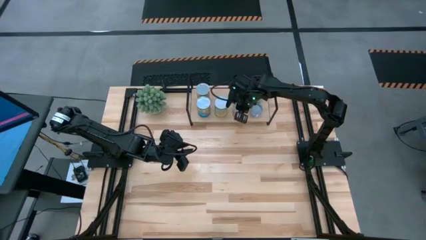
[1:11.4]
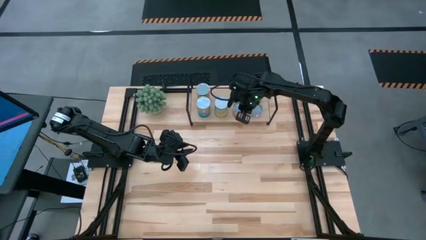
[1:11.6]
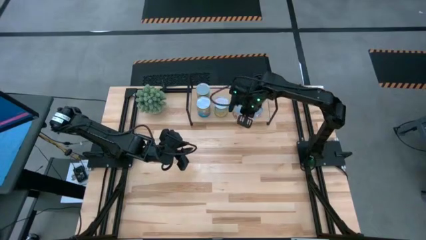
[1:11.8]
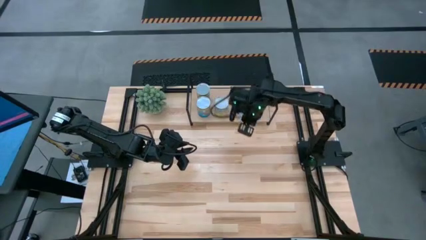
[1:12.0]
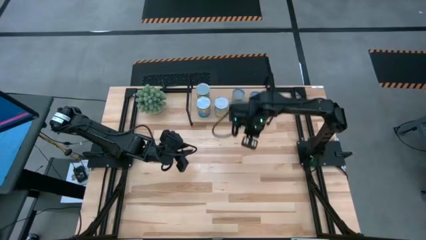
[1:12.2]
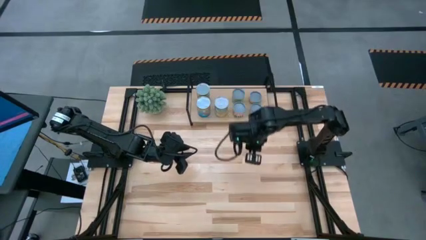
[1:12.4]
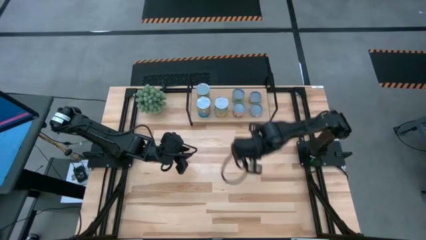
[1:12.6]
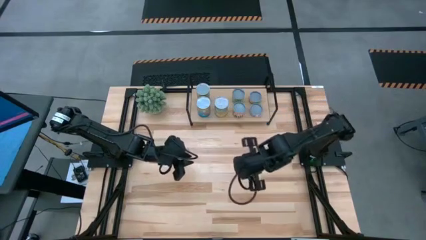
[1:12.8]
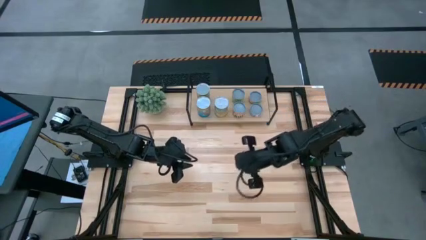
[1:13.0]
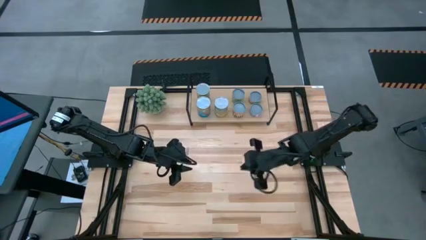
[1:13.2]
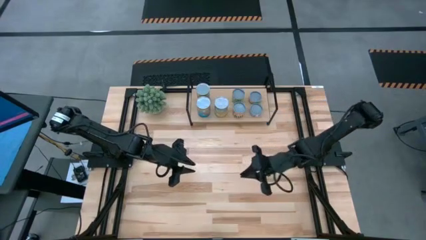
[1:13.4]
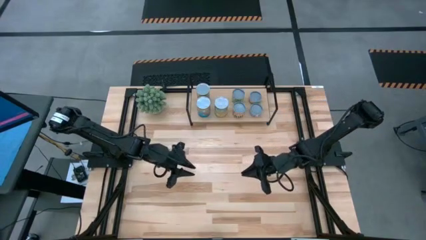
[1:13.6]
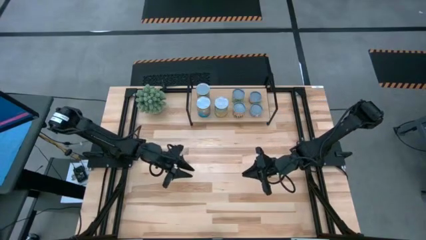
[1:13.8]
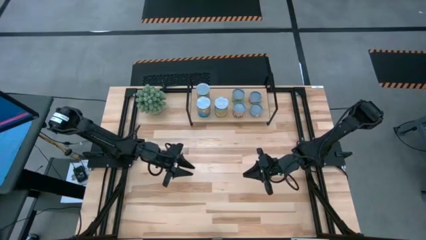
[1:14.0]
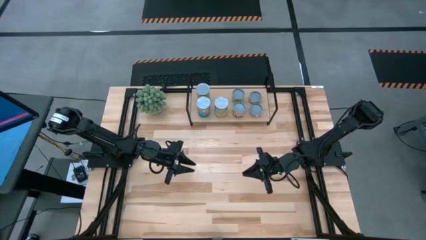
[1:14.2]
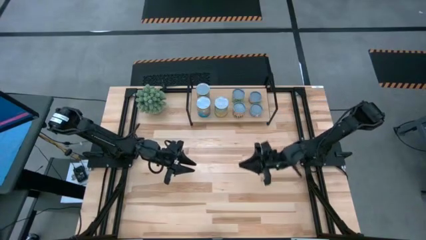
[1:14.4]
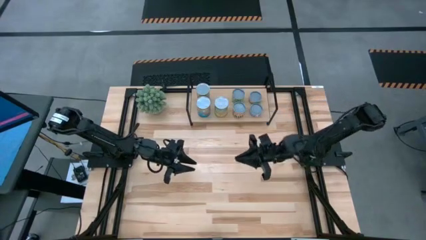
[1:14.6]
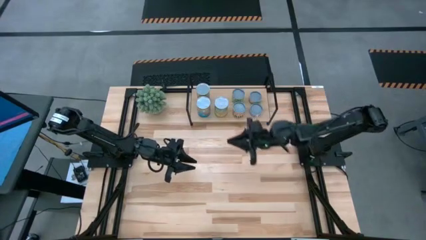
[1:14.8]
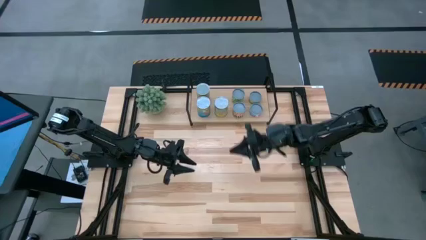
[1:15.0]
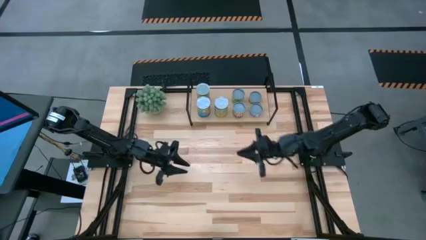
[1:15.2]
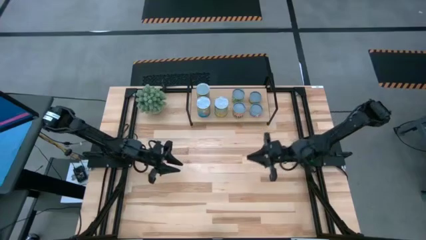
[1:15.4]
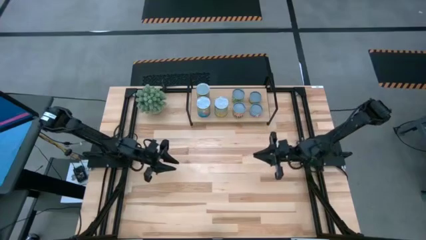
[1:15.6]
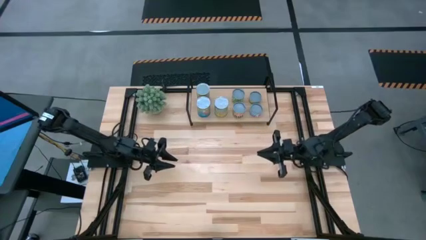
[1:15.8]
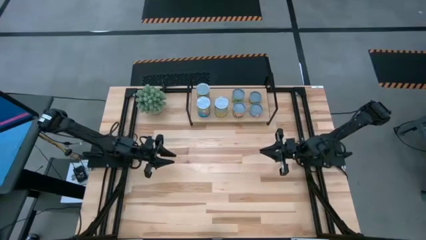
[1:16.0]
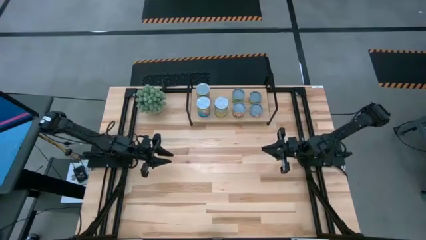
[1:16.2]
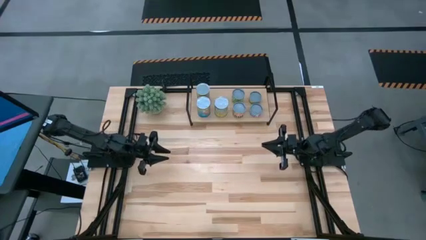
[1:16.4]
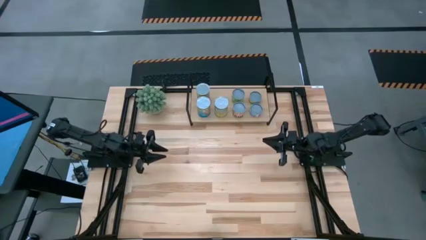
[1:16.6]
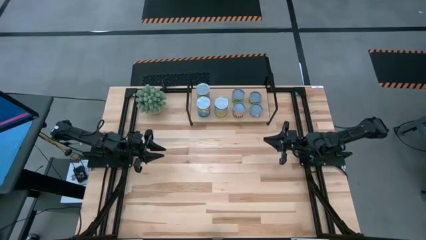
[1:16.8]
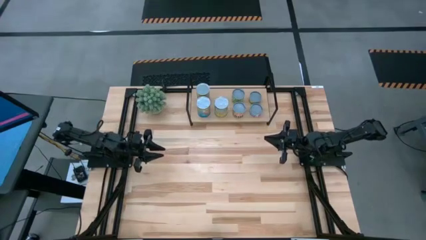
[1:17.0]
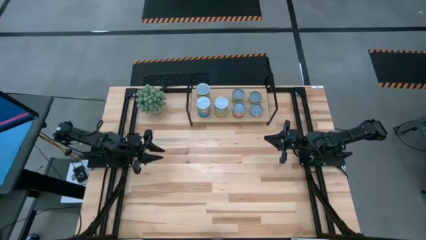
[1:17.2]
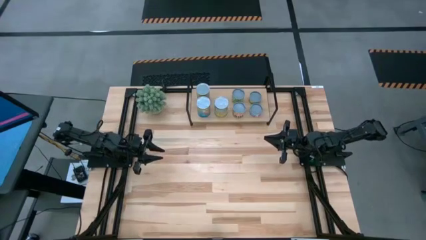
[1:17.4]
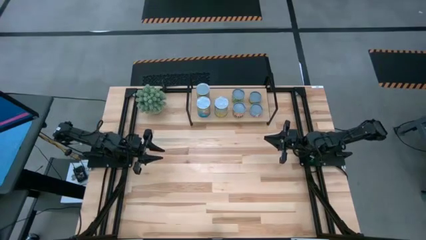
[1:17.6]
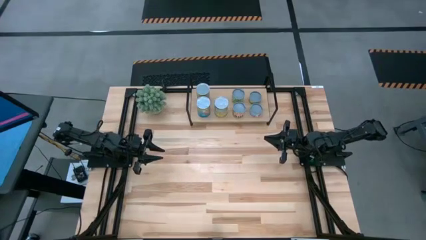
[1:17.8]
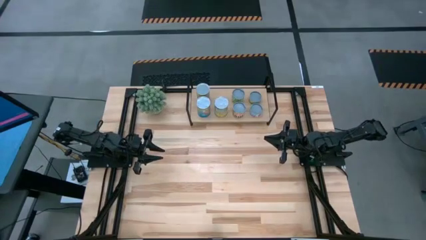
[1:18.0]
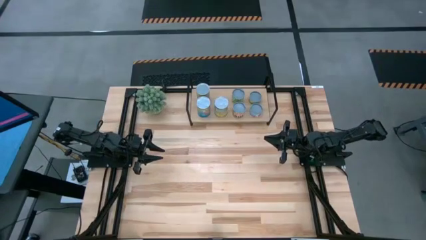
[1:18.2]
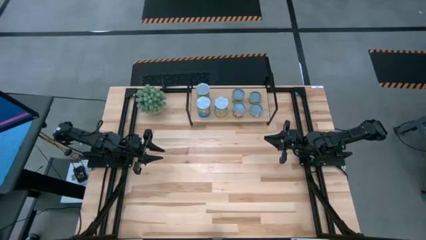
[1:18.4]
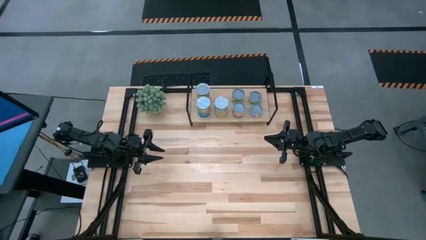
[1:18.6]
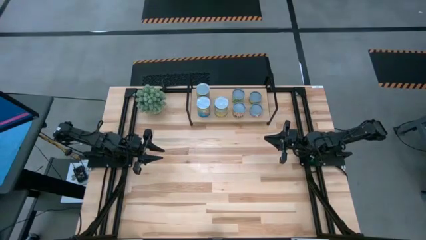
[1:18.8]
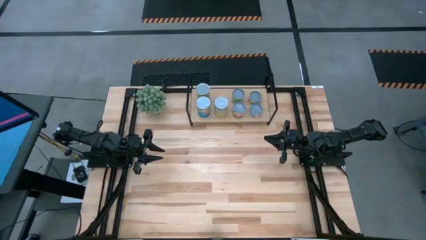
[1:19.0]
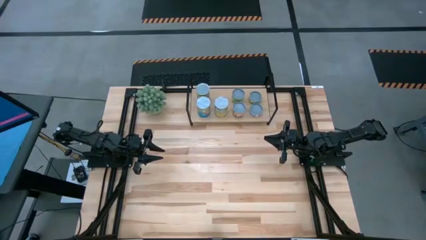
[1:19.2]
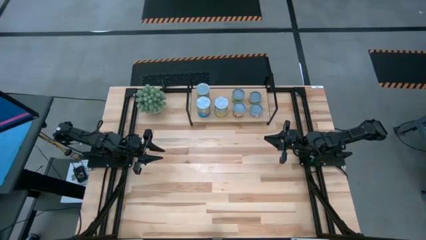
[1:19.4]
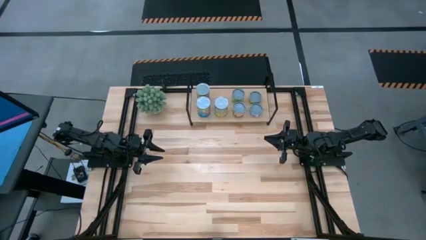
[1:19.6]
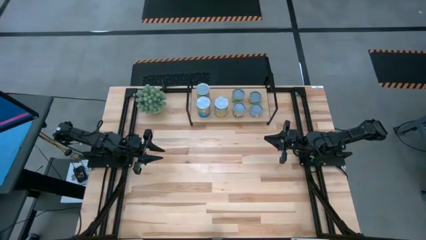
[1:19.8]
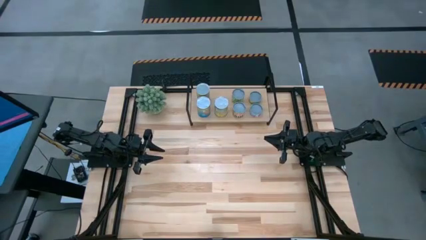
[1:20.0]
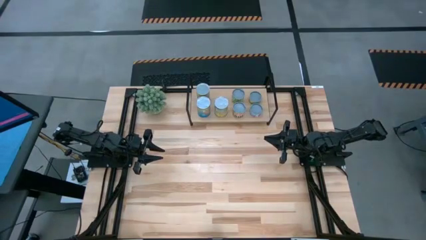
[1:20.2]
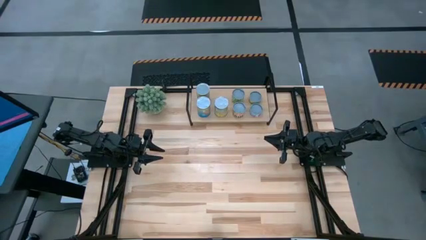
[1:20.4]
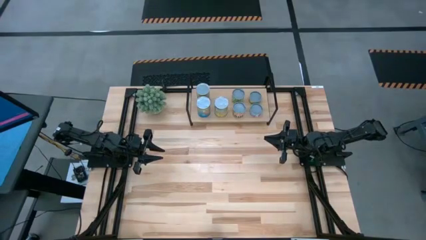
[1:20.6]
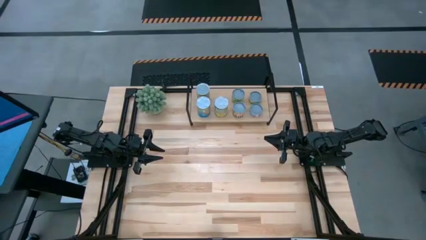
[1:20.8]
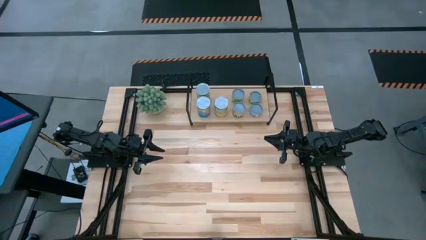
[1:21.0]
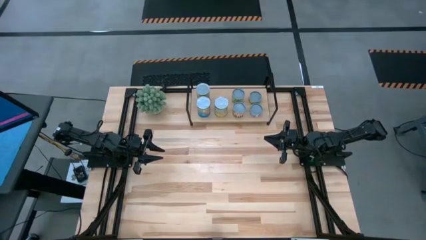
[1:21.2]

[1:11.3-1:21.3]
Task: Pick and place cans onto a shelf
Return to Home Position

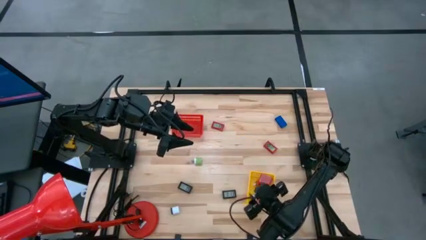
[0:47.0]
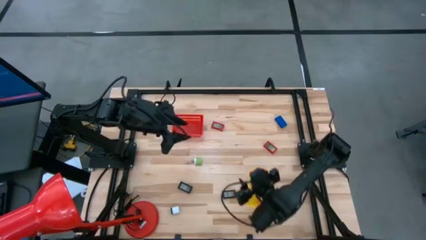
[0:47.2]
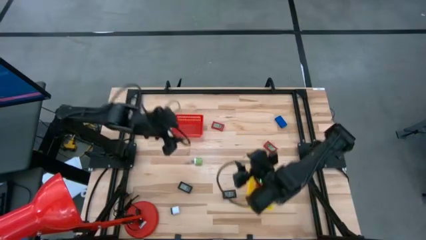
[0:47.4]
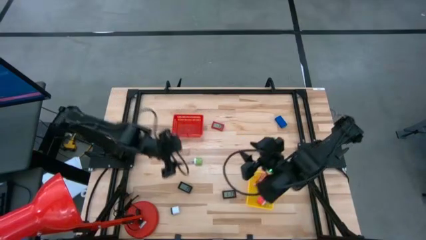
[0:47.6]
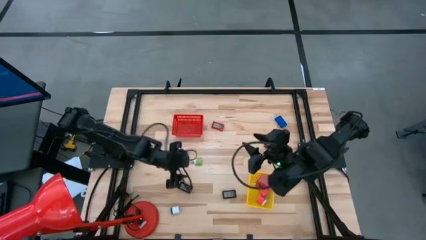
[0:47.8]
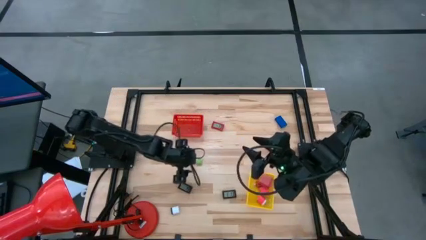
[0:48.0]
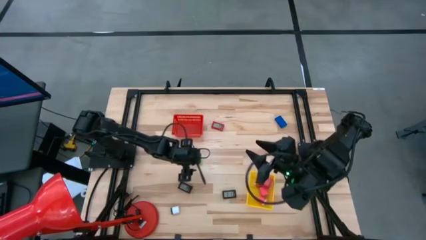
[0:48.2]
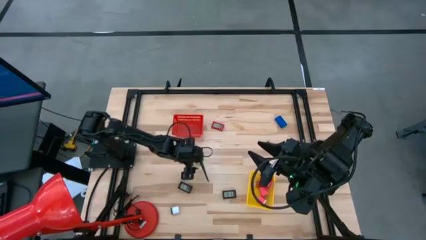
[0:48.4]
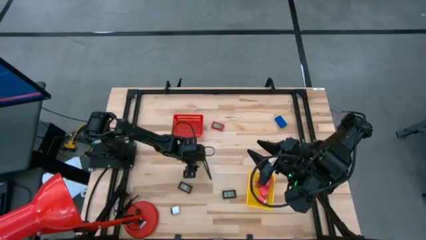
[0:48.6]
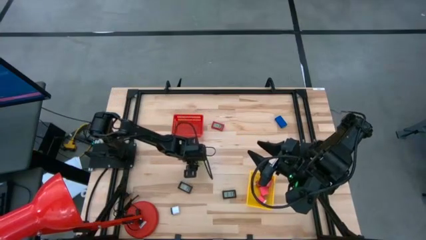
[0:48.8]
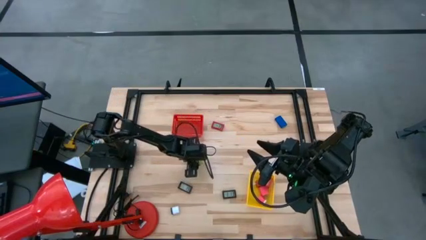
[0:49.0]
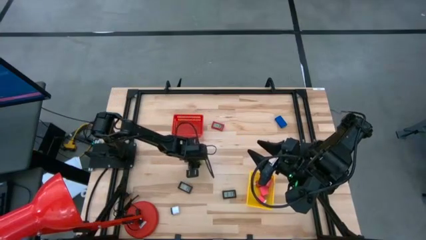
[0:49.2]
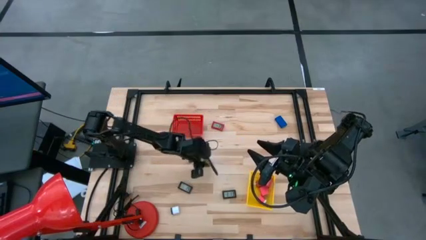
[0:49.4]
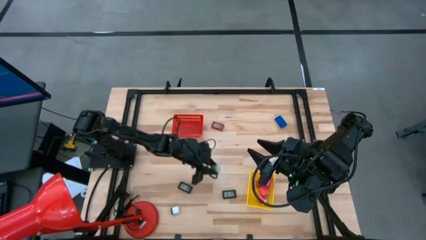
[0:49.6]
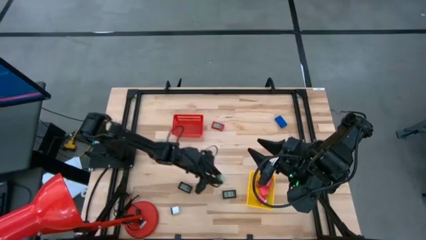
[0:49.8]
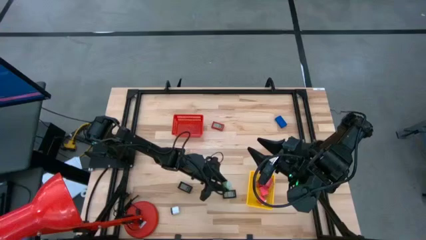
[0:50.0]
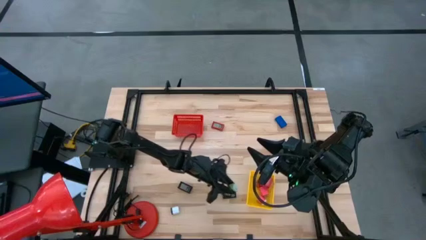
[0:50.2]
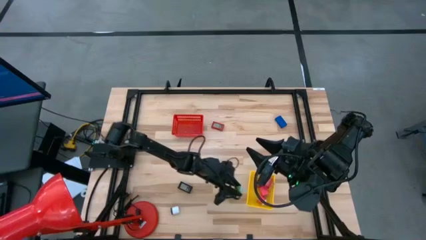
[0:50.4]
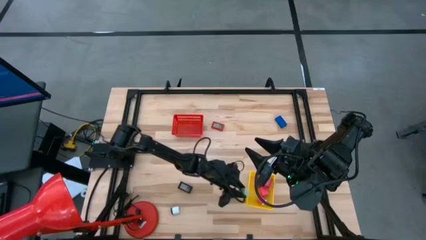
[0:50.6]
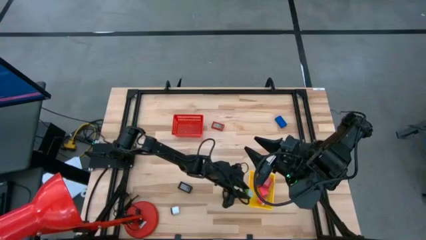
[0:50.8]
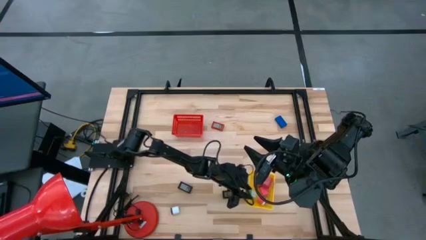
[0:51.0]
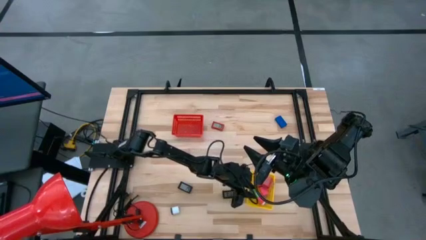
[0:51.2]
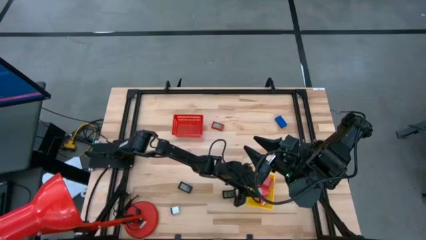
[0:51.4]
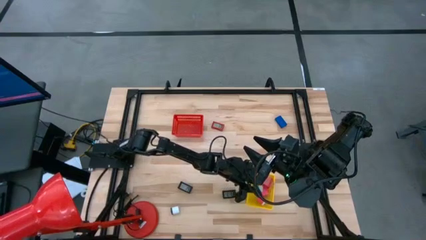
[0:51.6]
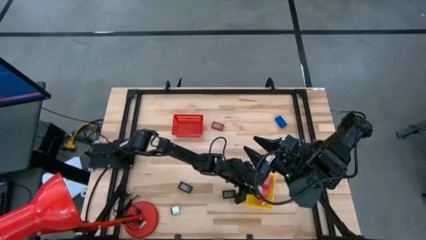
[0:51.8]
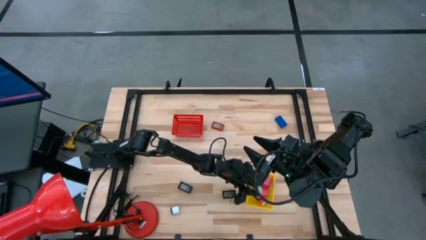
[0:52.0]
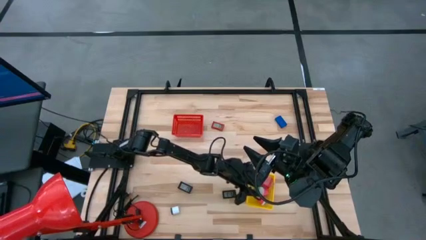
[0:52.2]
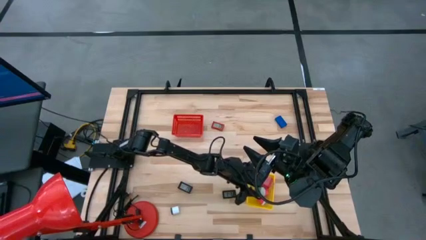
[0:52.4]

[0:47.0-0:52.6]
Task: Pick & Place Office items
Put the green charger adapter into the yellow basket

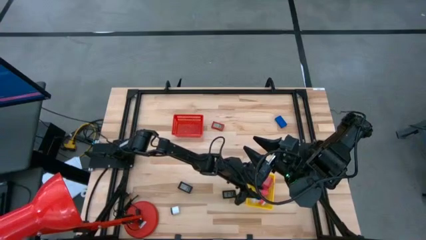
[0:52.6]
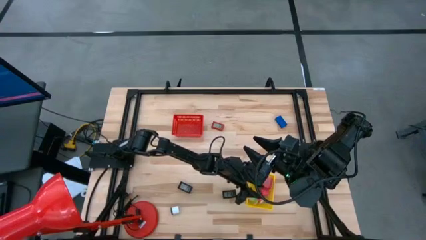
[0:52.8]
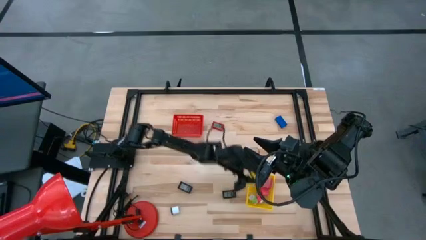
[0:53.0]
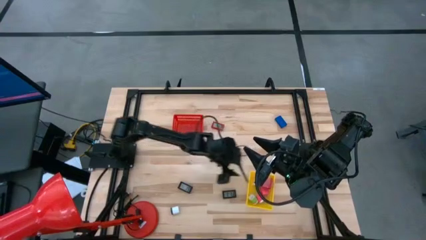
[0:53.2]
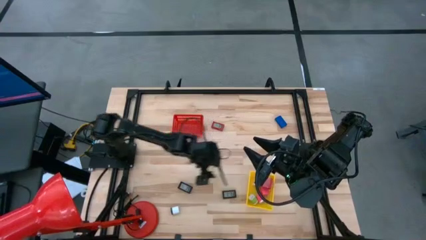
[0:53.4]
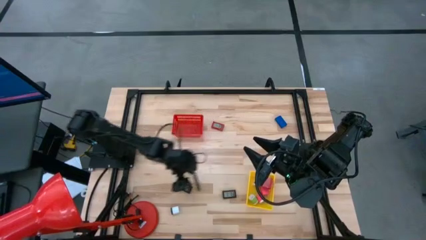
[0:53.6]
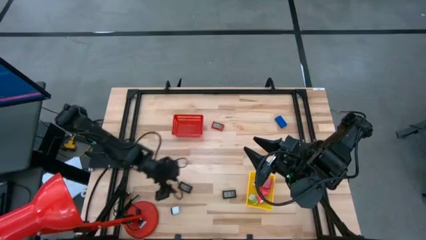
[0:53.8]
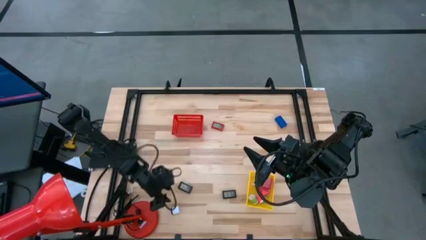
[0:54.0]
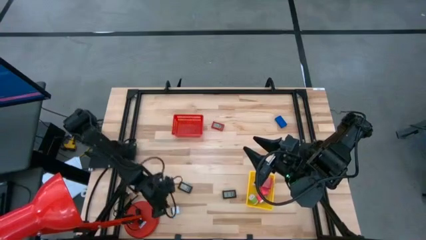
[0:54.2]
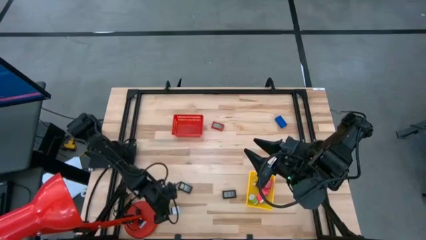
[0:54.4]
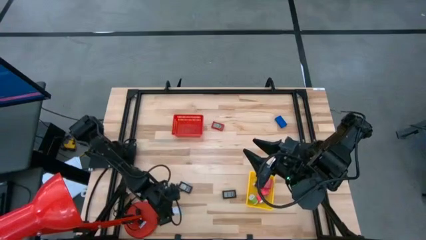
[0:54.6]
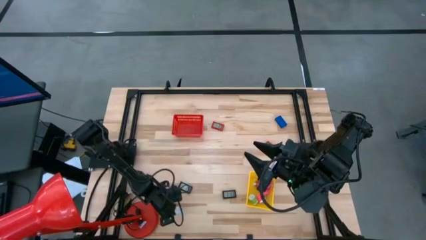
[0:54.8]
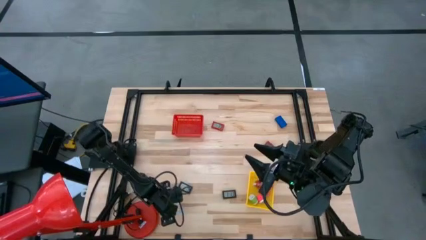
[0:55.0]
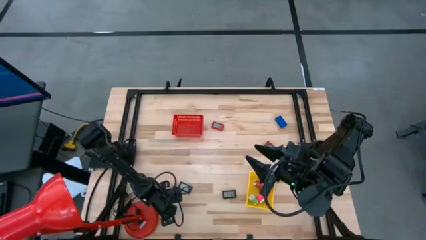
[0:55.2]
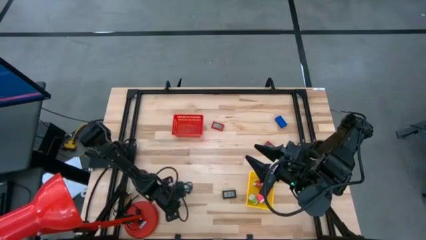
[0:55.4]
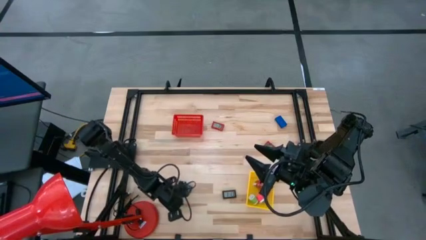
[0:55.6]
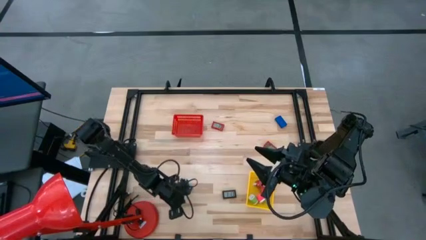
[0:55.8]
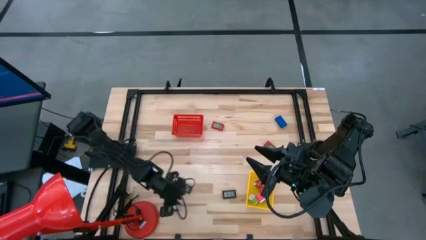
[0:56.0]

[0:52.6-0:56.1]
Put the white charger adapter into the yellow basket
